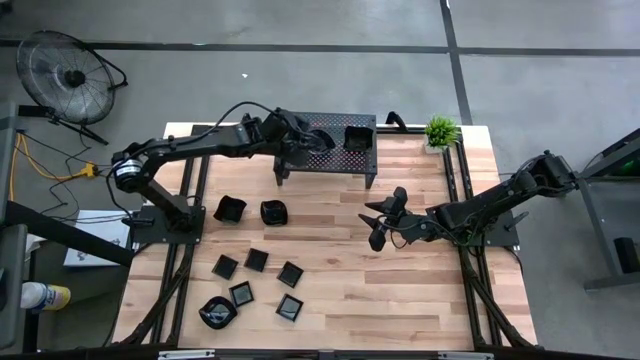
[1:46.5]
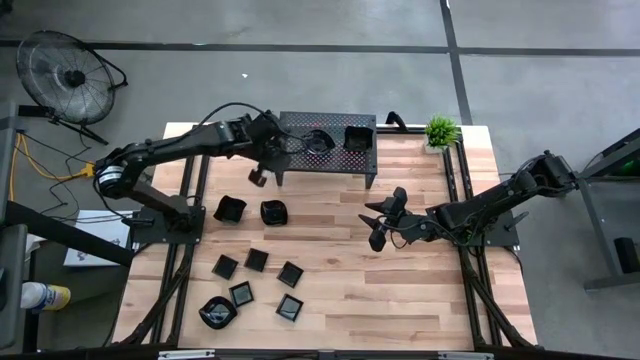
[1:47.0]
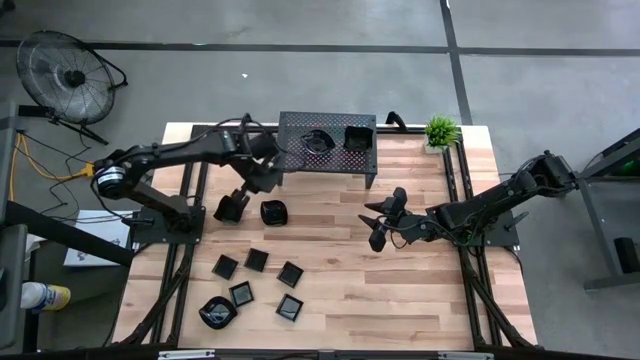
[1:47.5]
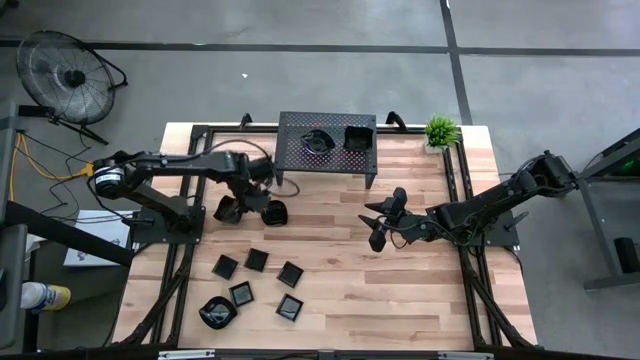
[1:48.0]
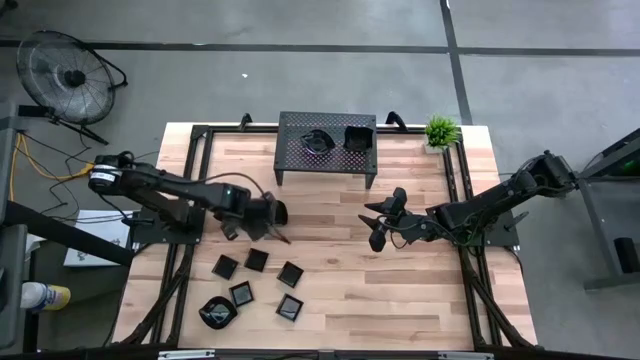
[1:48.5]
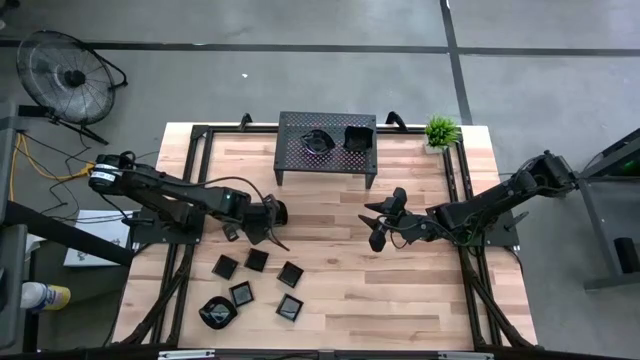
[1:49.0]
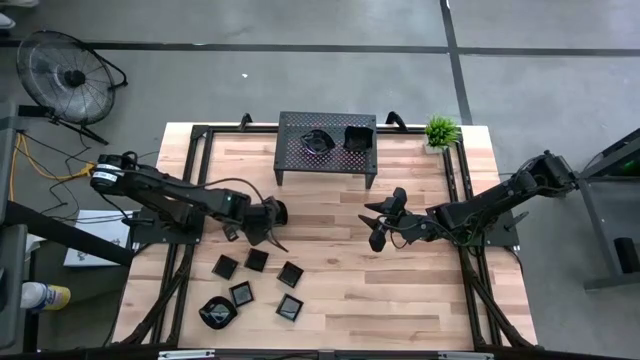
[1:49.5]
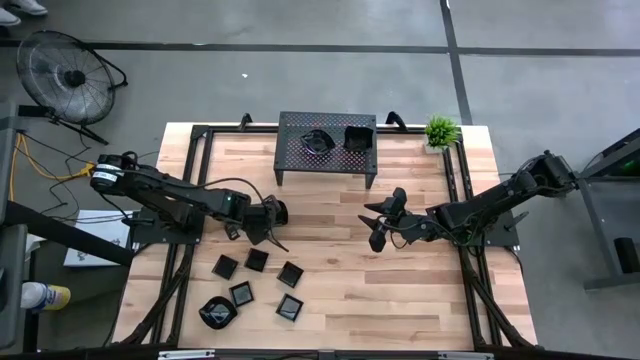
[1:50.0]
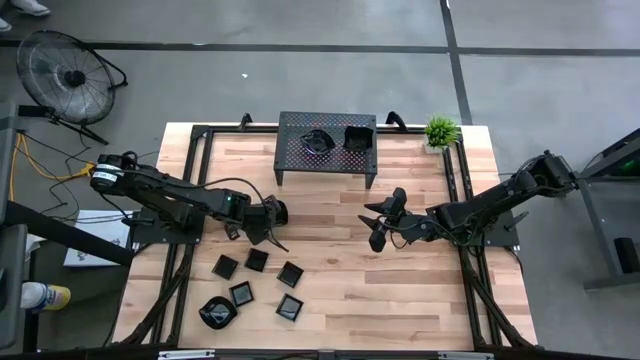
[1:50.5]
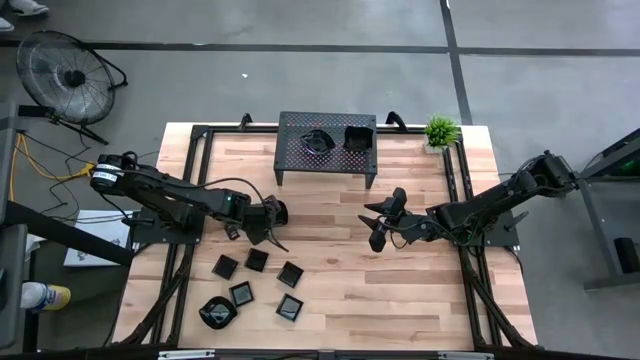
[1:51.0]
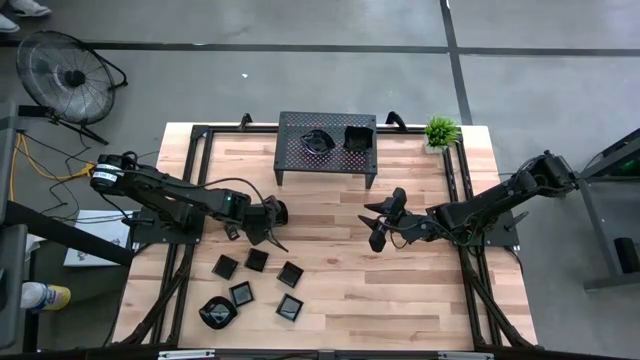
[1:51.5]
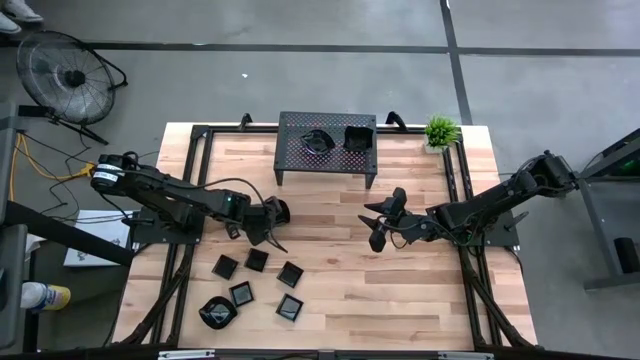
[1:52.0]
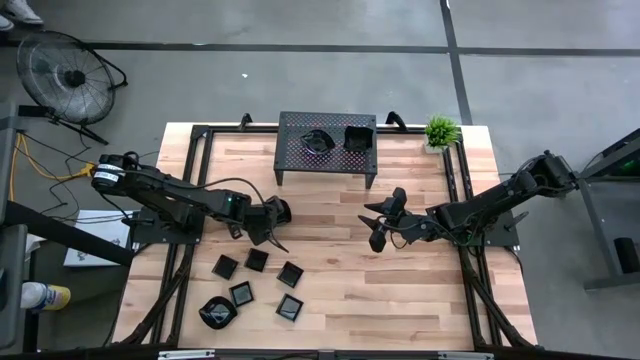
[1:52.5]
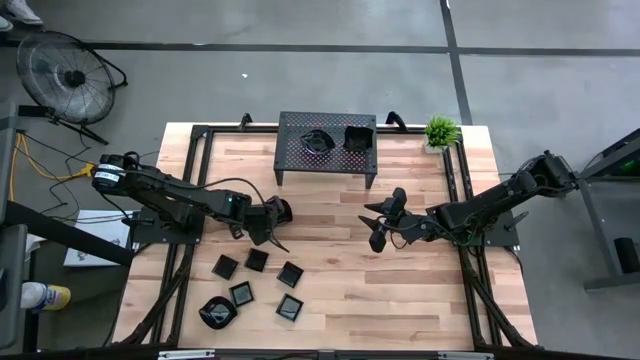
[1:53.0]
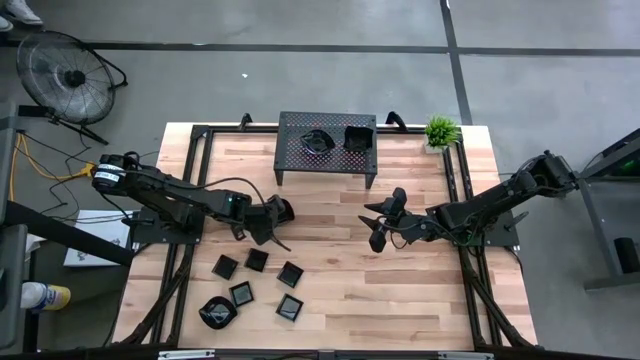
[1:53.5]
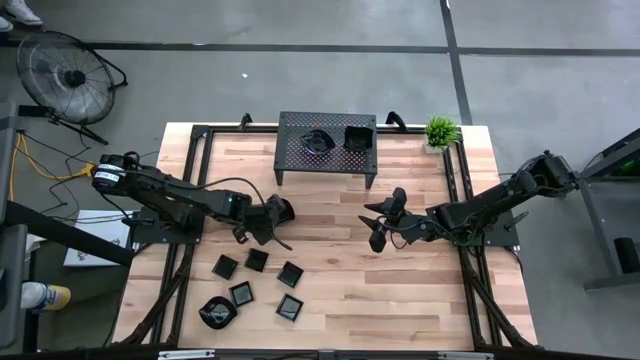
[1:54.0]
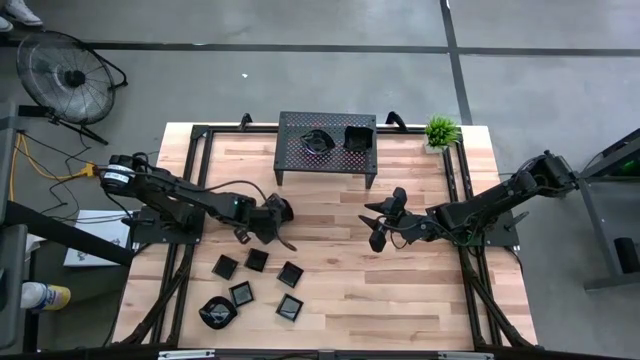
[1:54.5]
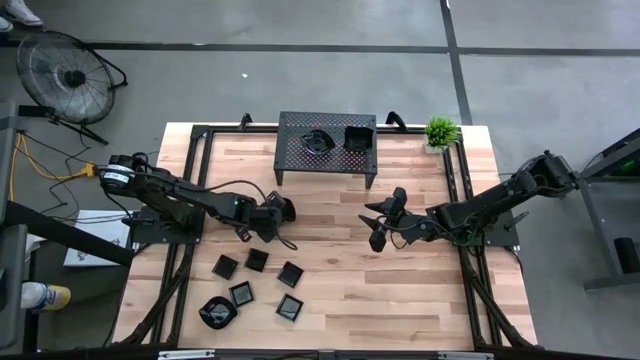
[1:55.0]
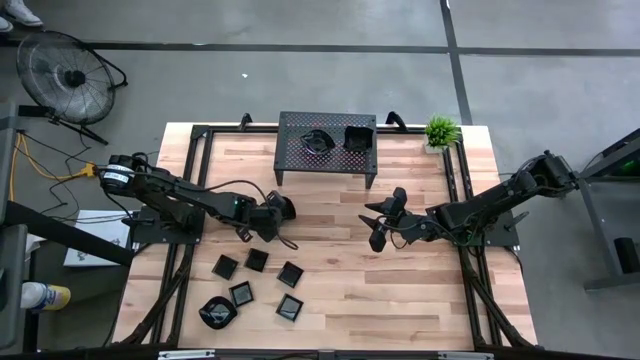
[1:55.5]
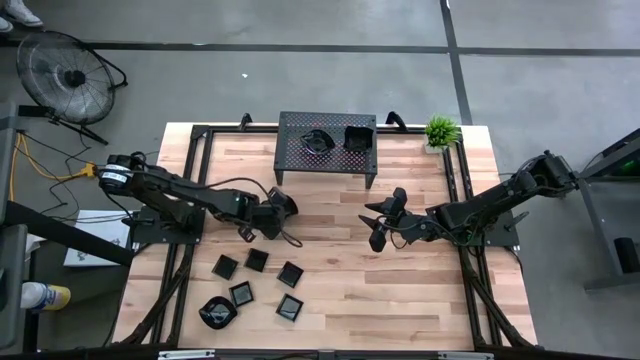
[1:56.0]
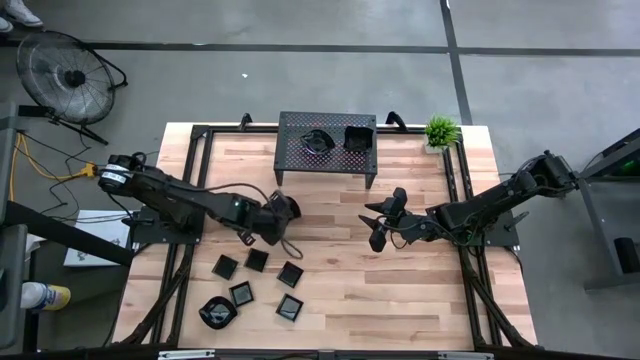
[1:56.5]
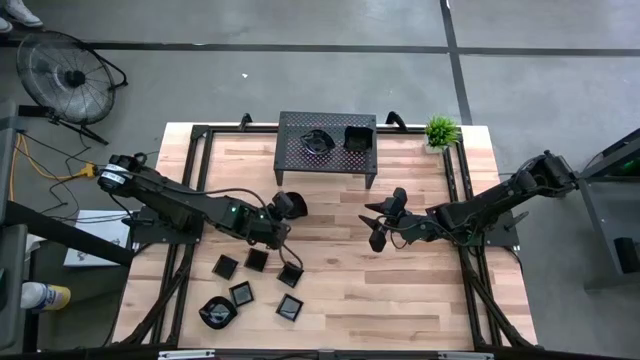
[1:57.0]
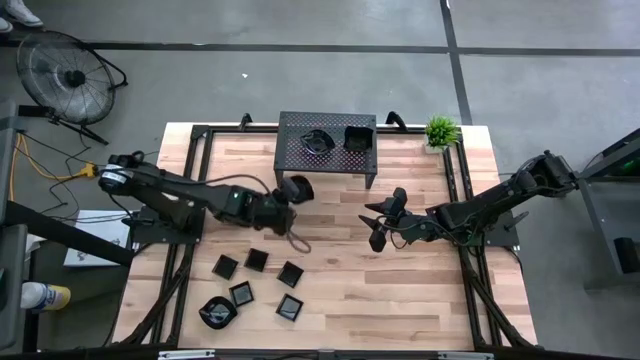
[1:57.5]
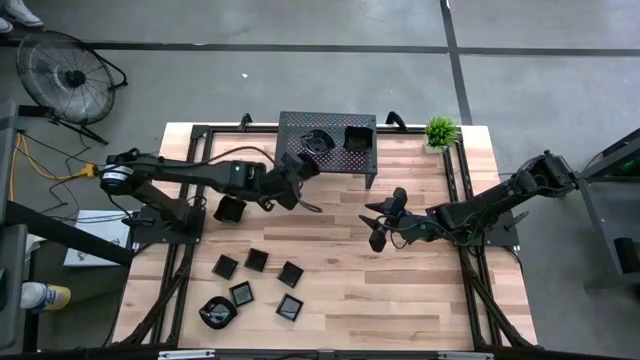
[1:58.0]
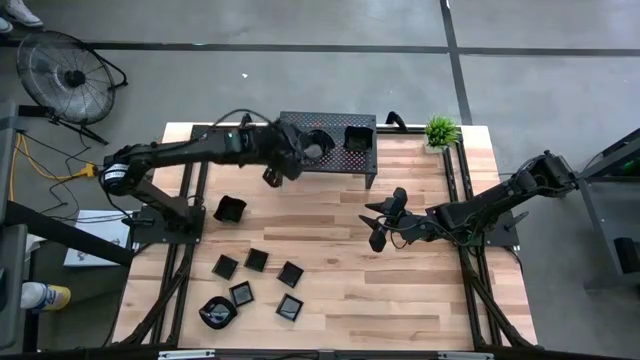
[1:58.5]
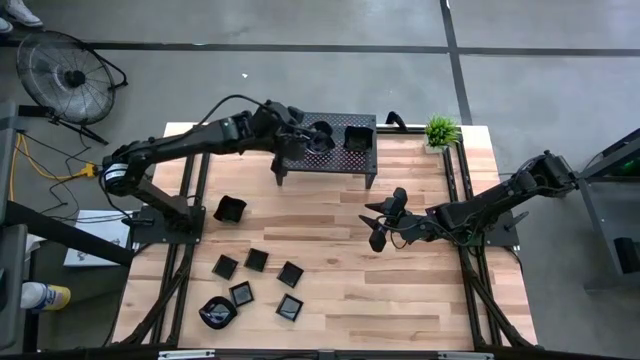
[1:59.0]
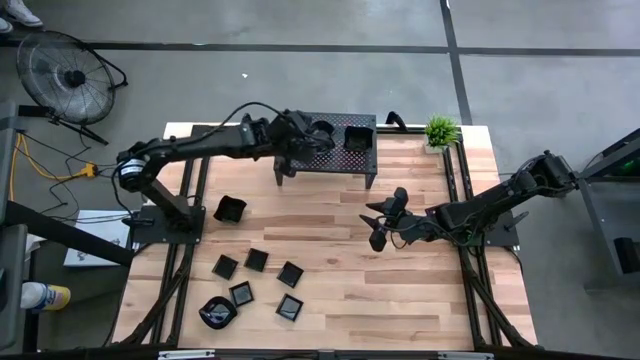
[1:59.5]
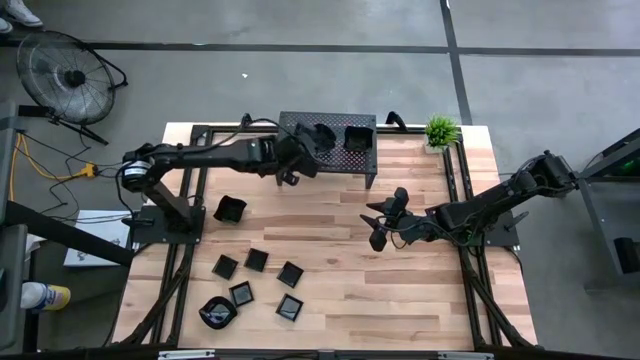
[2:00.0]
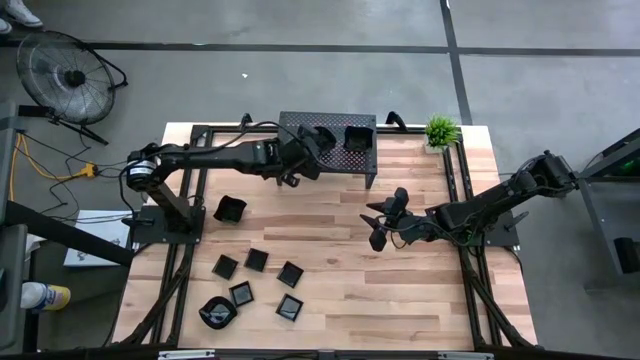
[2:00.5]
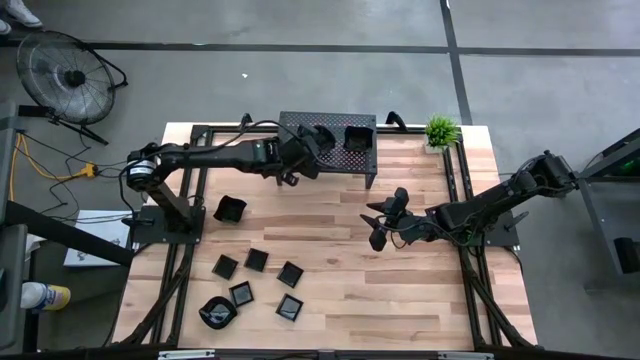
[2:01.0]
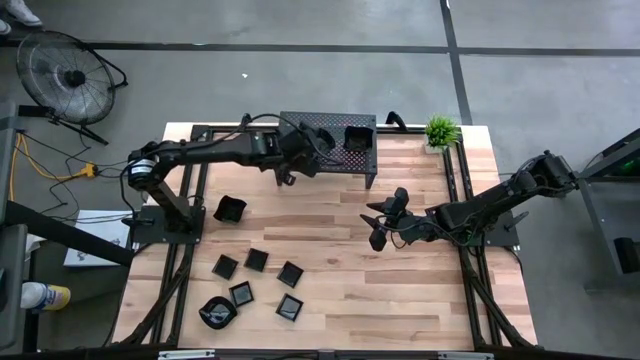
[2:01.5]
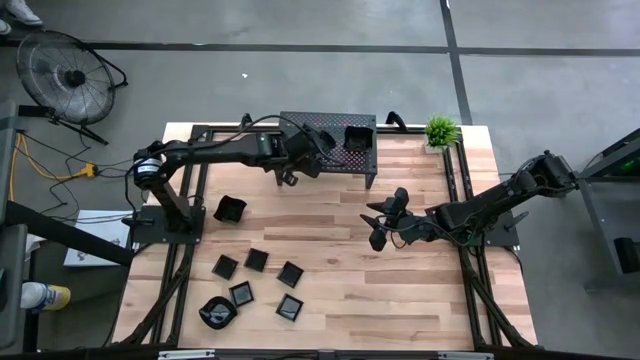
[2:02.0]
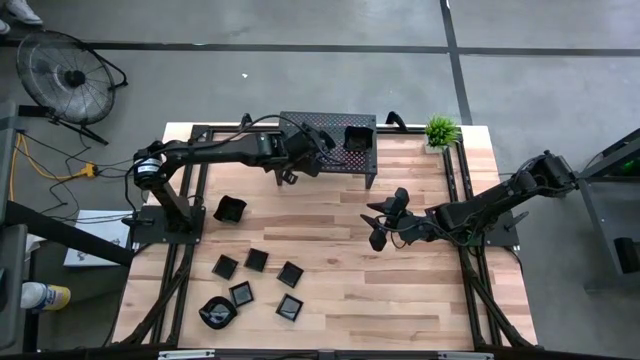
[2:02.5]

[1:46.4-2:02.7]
Task: Pick & Place Mini shaped plates
Stack the top black leaf shaped plate on top of the black leaf shaped plates on the shelf

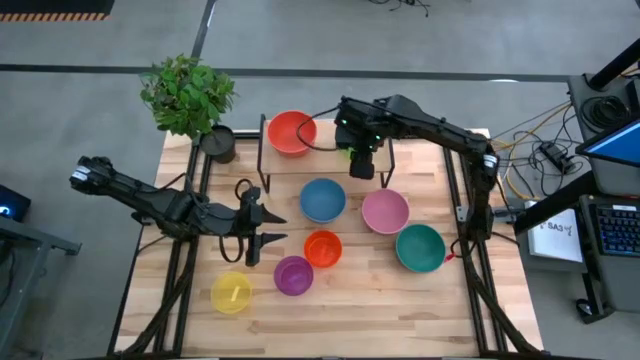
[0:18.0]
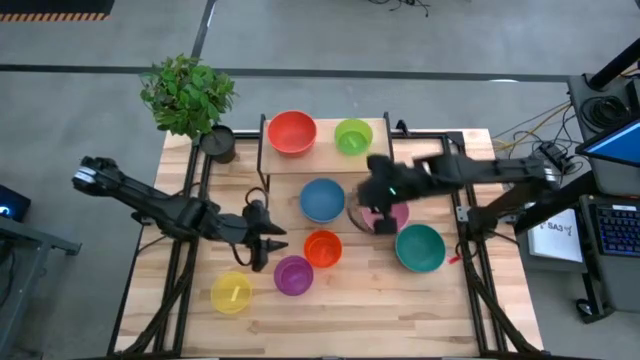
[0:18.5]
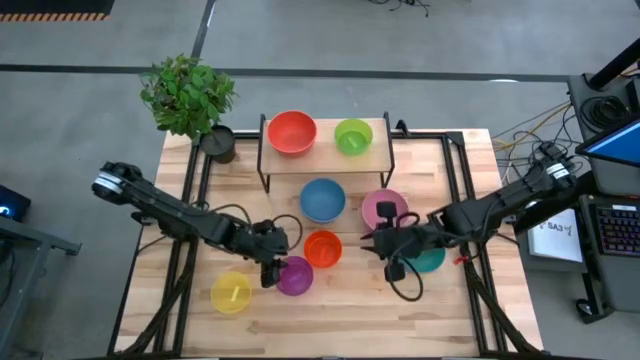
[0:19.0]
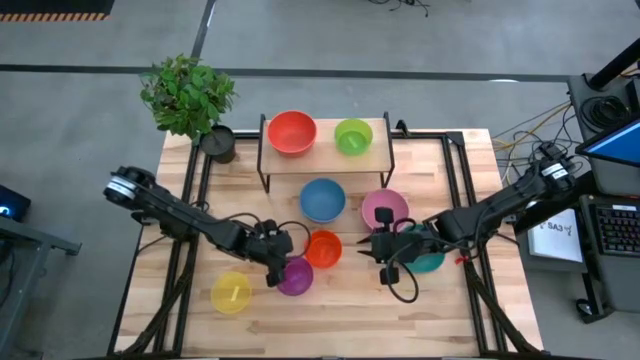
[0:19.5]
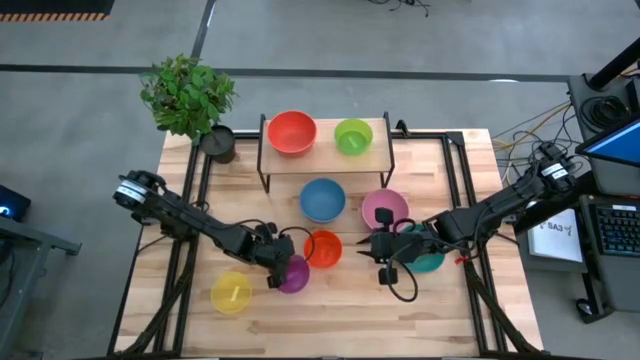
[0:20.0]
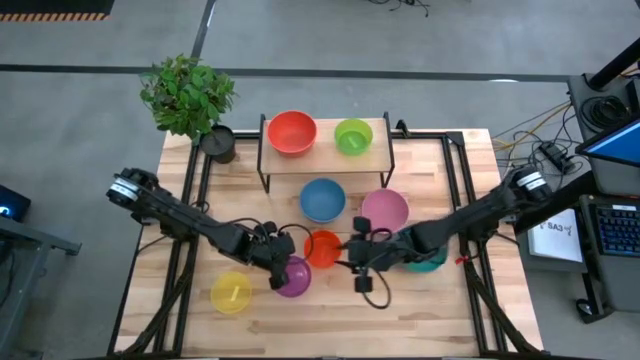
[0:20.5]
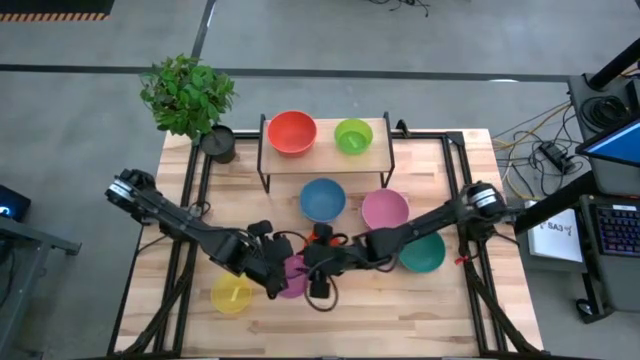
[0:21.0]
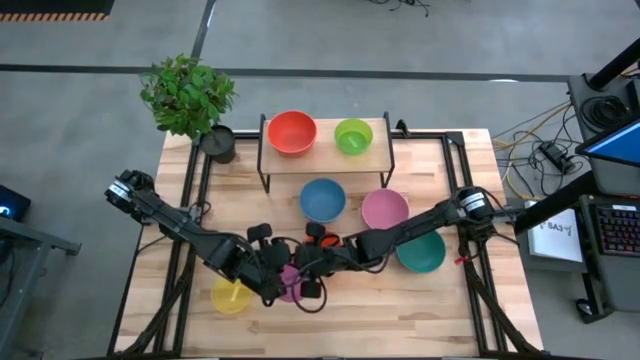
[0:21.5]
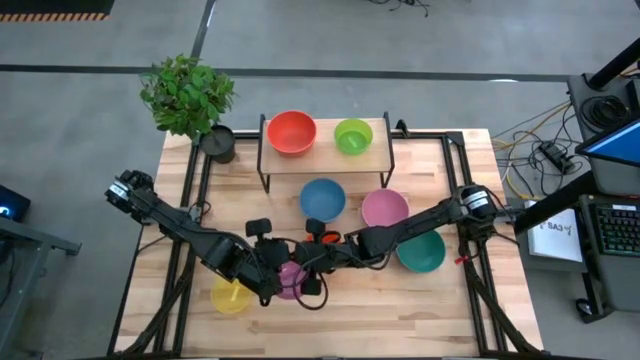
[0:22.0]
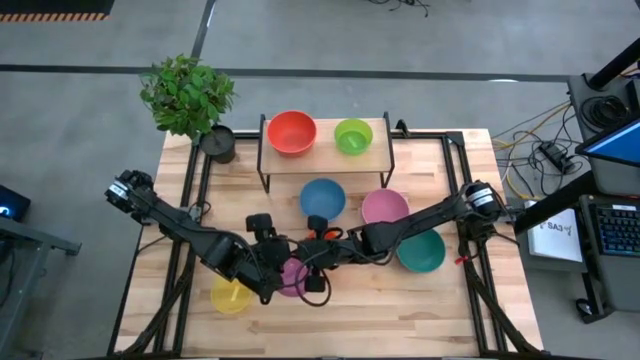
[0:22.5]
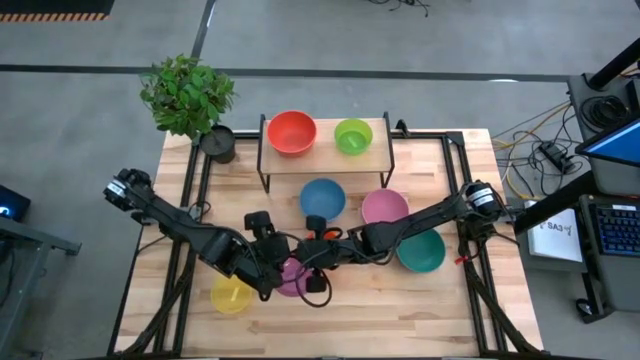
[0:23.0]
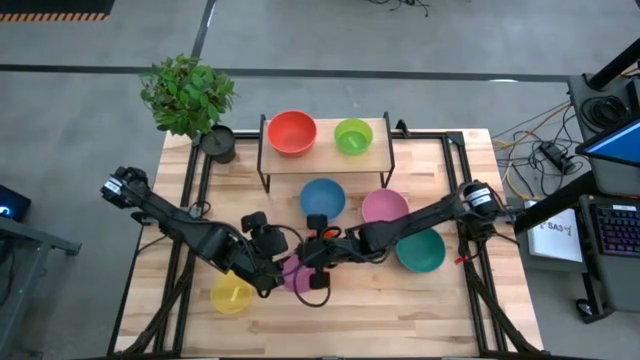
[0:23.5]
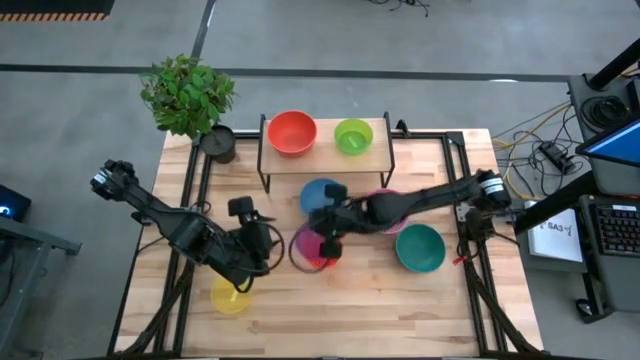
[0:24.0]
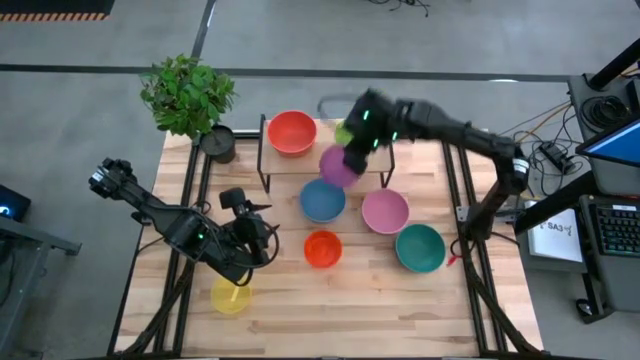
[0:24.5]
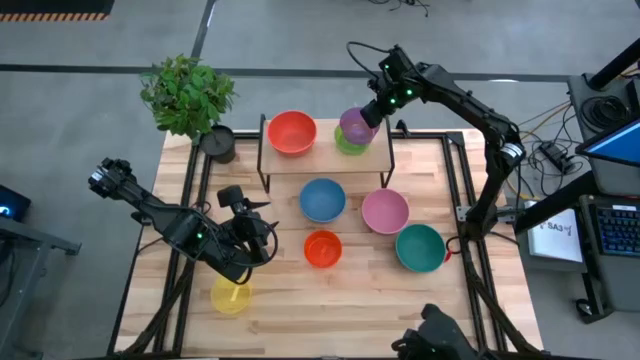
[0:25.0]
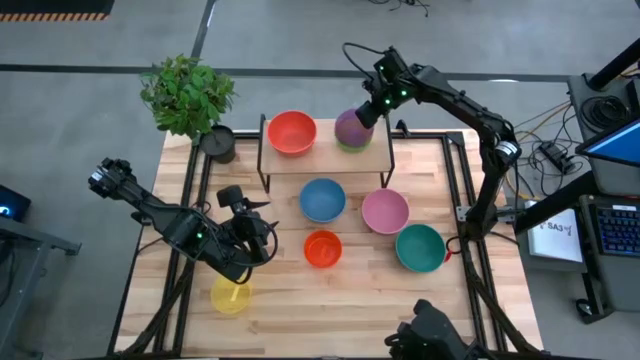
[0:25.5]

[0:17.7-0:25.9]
Task: Place and stack bowls onto a shelf
Stack the small violet bowl on top of the small light green bowl on the shelf
